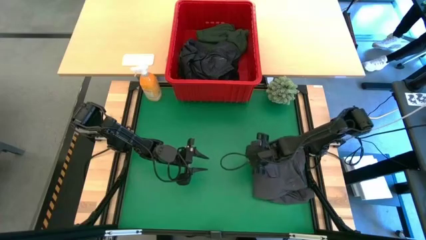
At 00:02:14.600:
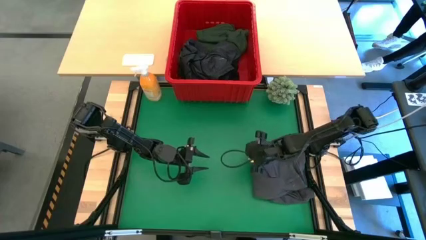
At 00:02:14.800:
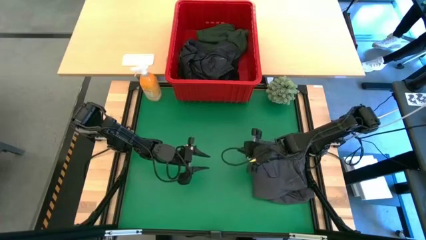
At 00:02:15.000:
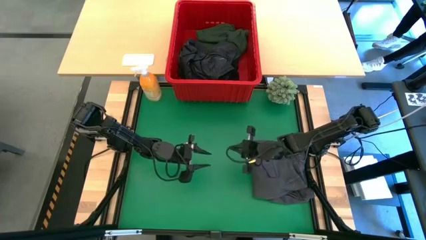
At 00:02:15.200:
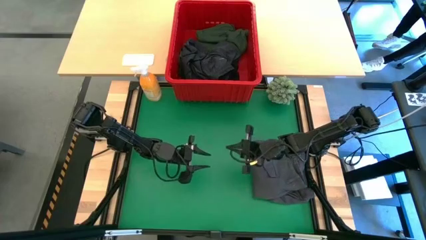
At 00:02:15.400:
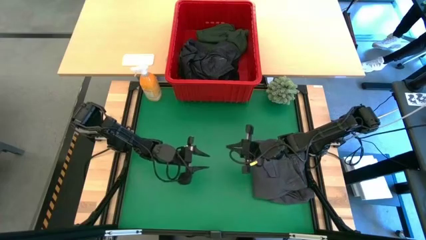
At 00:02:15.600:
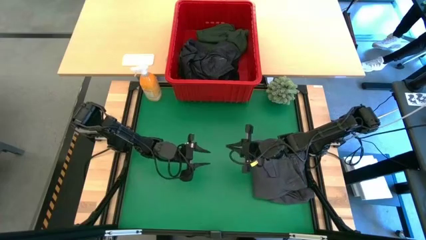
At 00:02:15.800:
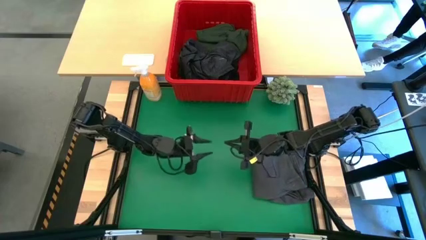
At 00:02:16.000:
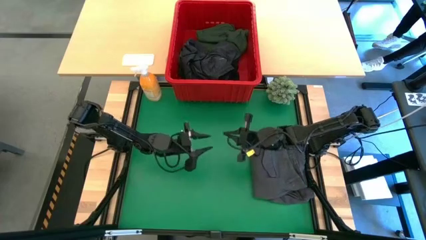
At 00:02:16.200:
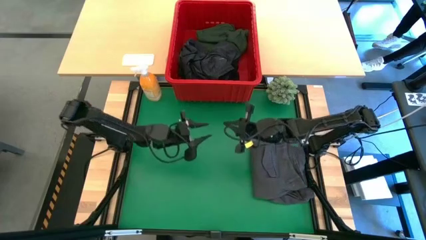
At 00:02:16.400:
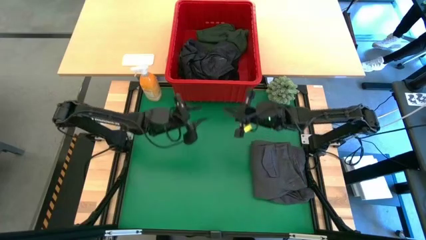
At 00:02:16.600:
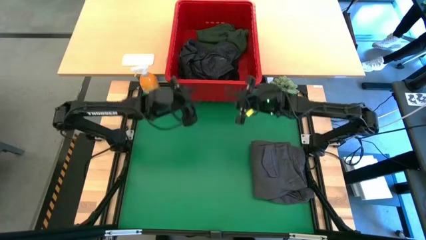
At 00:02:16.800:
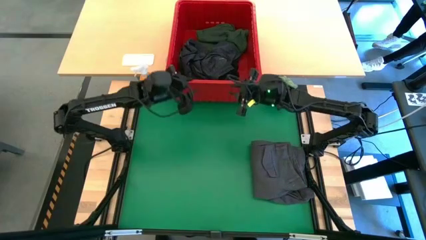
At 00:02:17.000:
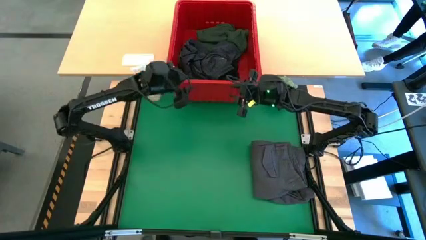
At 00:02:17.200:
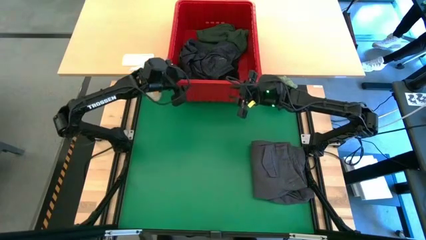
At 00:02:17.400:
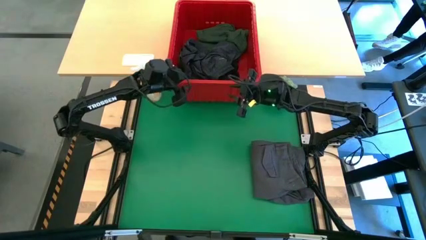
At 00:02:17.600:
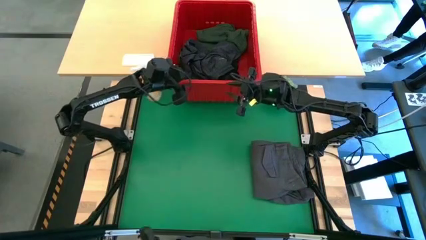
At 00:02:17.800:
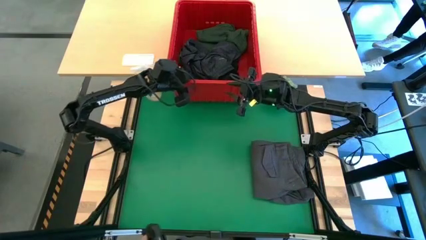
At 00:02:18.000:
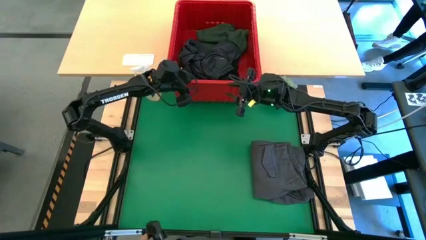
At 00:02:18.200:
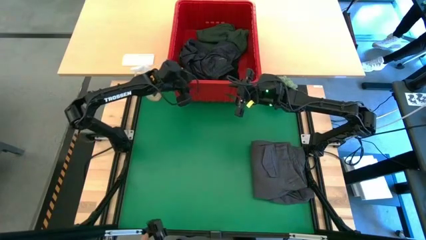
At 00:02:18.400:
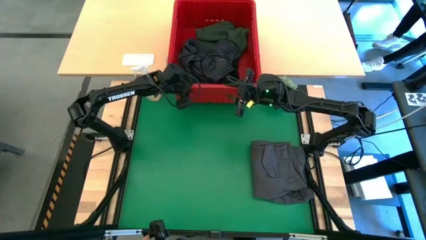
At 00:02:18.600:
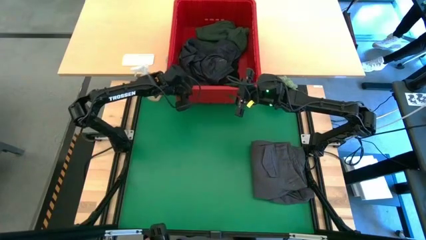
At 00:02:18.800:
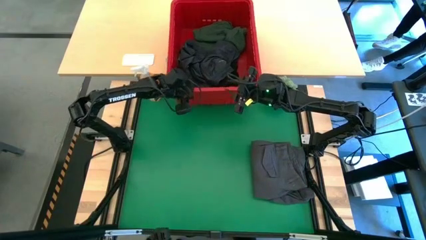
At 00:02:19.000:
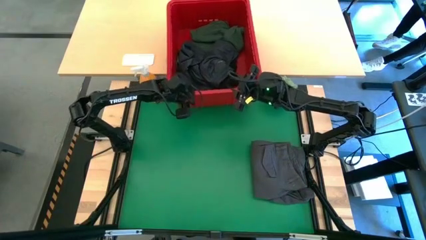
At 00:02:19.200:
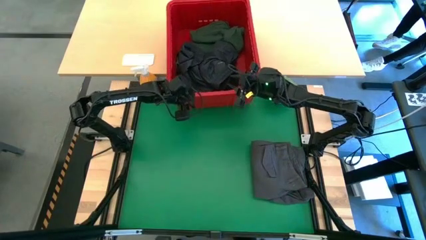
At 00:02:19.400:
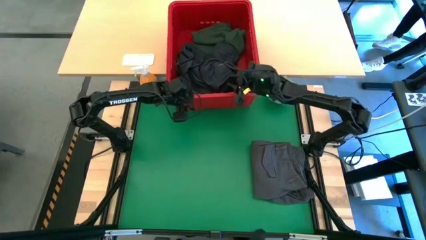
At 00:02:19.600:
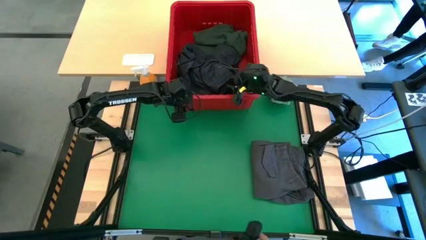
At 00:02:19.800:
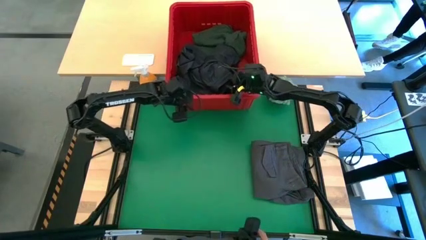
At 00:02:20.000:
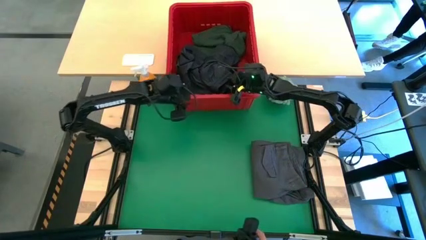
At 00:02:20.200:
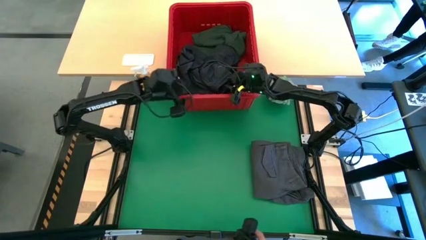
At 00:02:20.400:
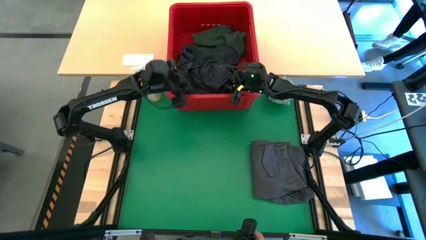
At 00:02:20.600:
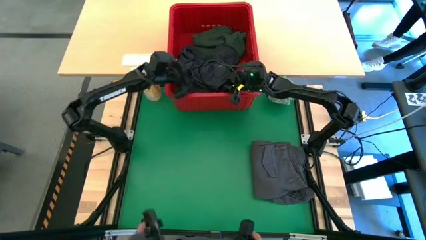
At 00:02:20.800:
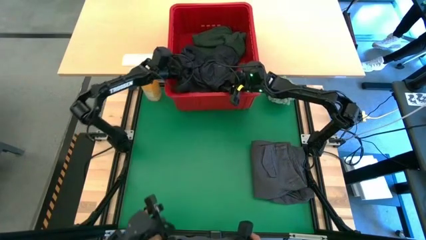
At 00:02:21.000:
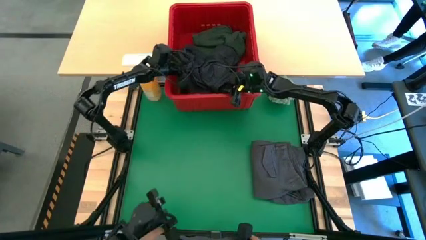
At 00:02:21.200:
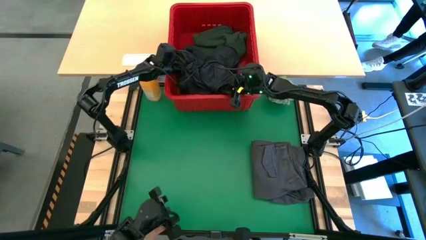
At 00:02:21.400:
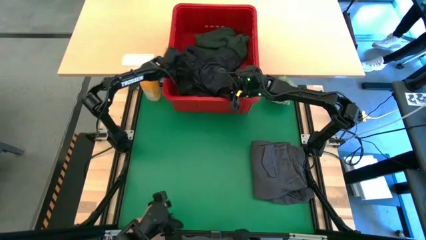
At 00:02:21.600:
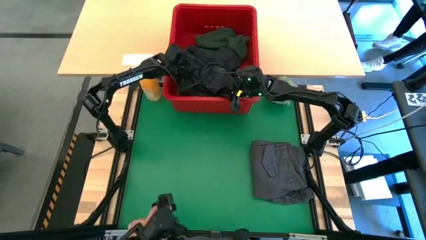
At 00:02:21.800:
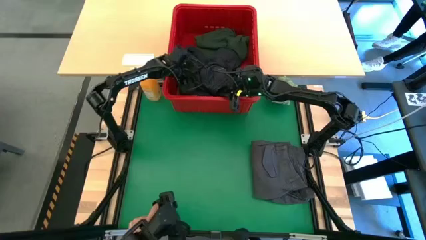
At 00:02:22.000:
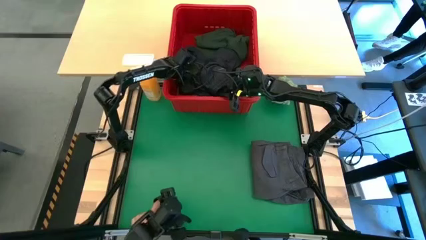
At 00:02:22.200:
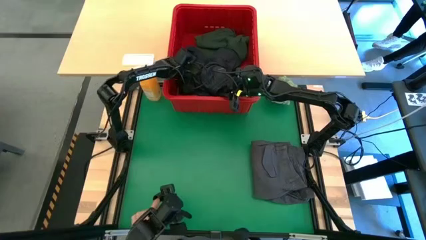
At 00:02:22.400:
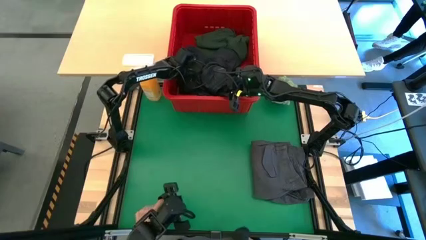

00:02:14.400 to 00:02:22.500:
Task: Fold Laundry from Bin
Remove the dark gray short from the red bin

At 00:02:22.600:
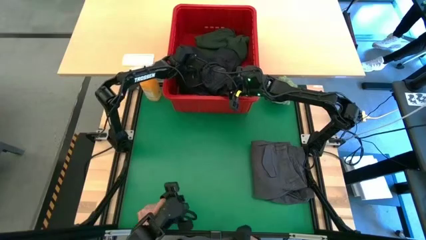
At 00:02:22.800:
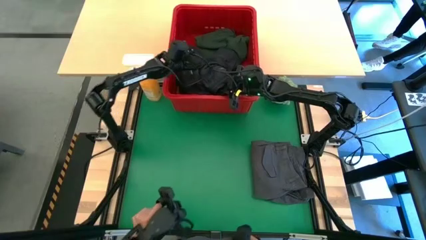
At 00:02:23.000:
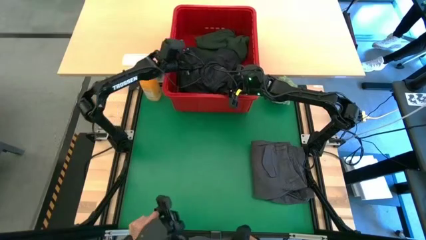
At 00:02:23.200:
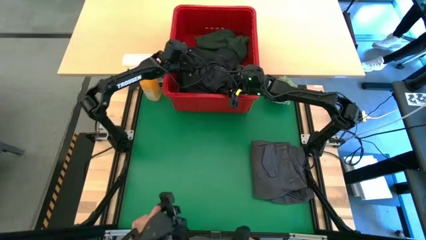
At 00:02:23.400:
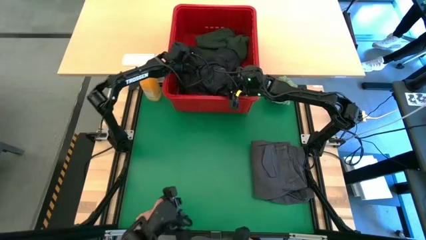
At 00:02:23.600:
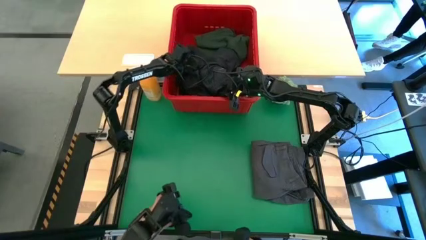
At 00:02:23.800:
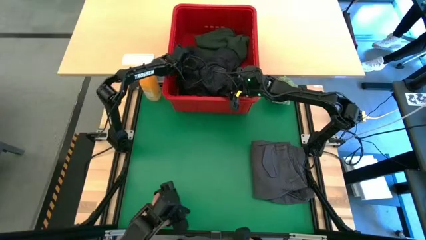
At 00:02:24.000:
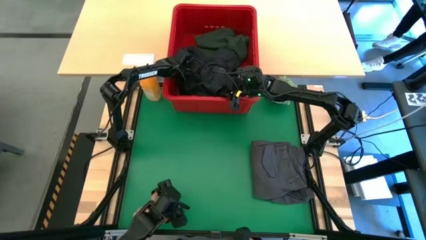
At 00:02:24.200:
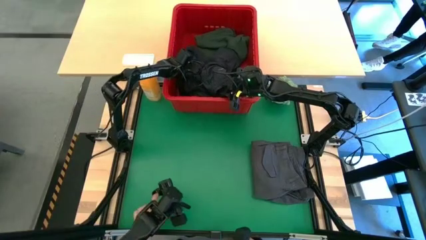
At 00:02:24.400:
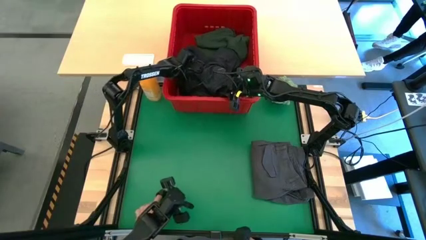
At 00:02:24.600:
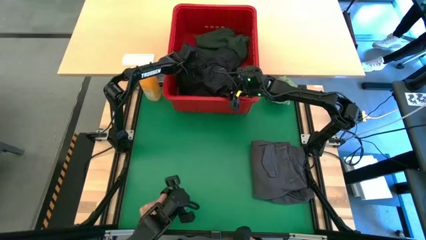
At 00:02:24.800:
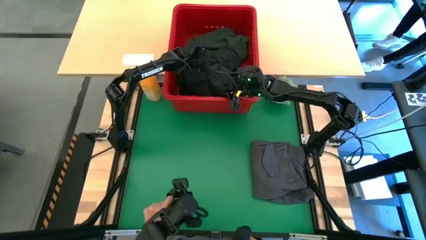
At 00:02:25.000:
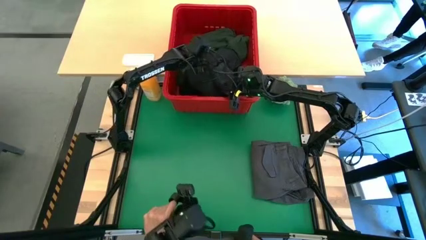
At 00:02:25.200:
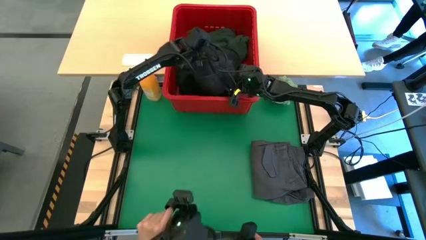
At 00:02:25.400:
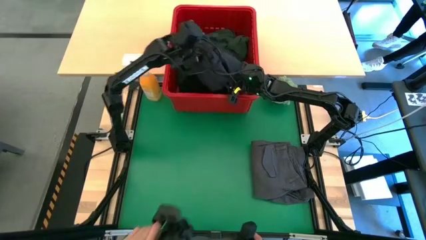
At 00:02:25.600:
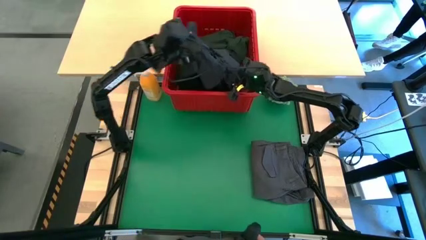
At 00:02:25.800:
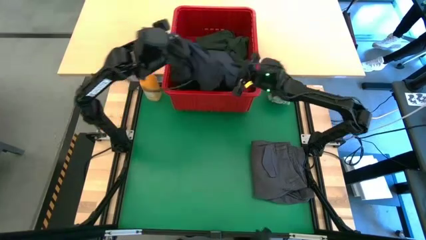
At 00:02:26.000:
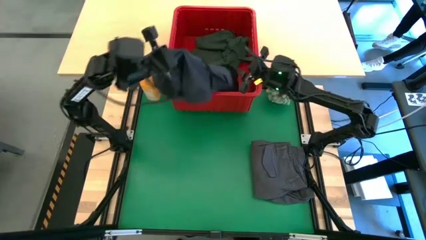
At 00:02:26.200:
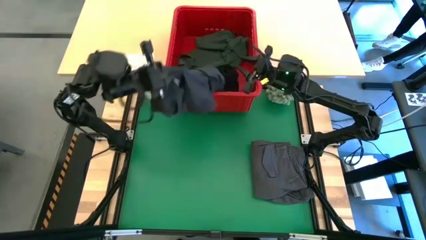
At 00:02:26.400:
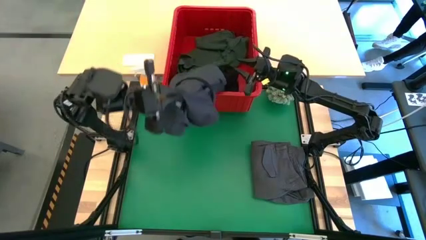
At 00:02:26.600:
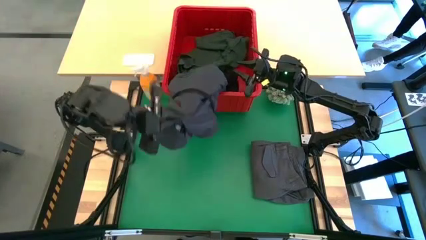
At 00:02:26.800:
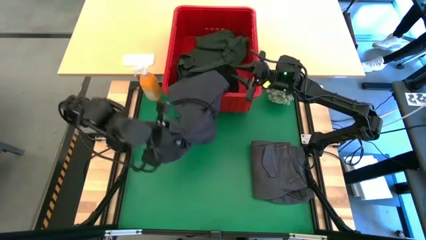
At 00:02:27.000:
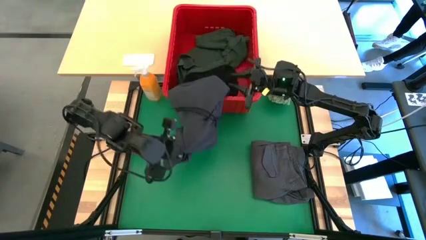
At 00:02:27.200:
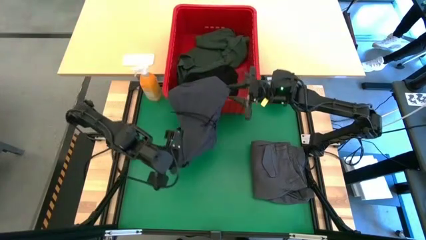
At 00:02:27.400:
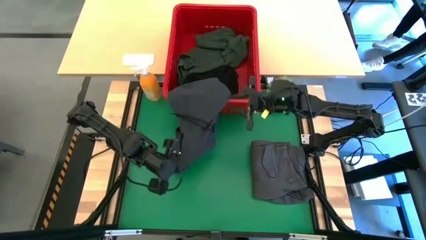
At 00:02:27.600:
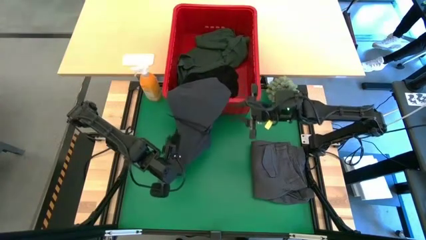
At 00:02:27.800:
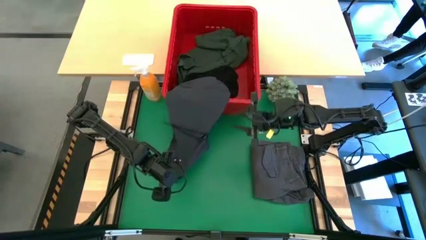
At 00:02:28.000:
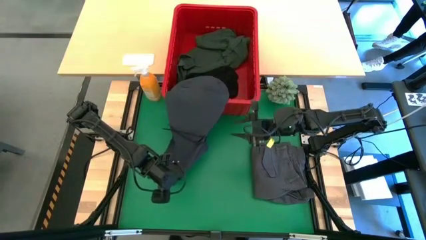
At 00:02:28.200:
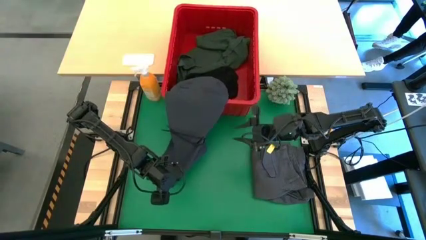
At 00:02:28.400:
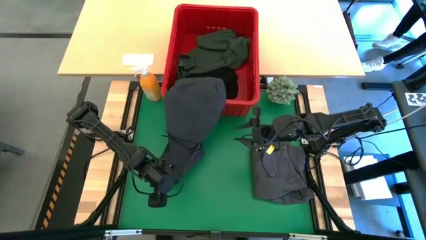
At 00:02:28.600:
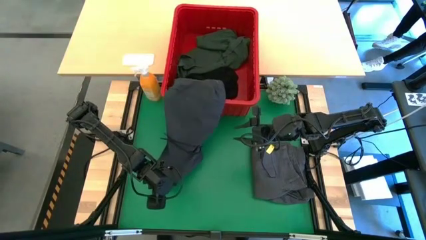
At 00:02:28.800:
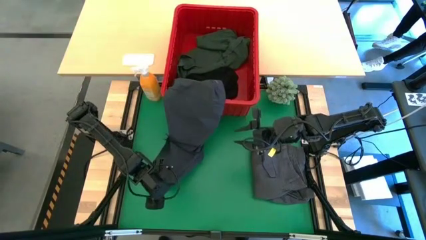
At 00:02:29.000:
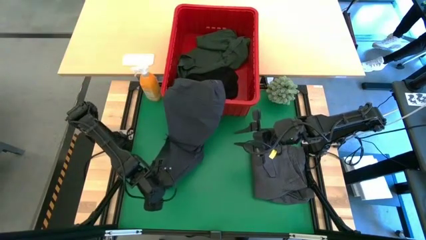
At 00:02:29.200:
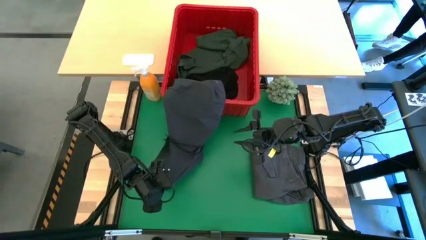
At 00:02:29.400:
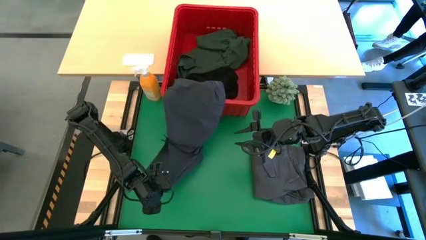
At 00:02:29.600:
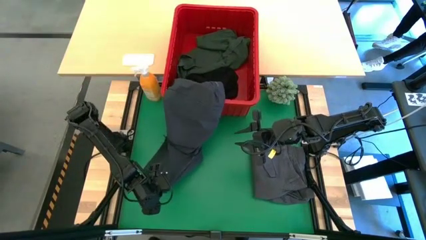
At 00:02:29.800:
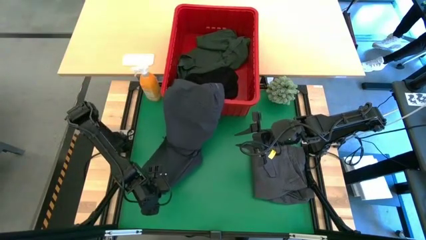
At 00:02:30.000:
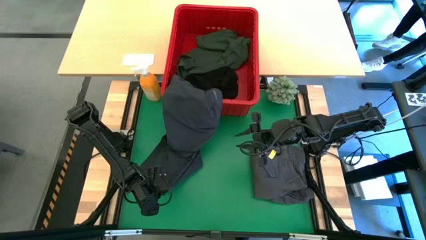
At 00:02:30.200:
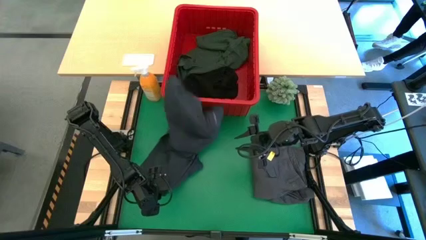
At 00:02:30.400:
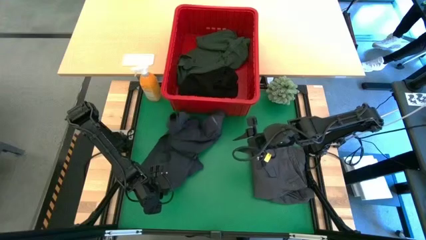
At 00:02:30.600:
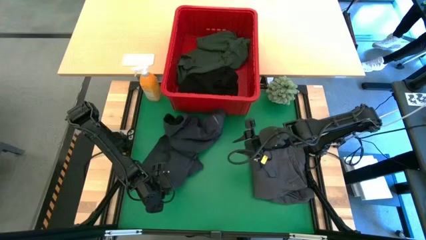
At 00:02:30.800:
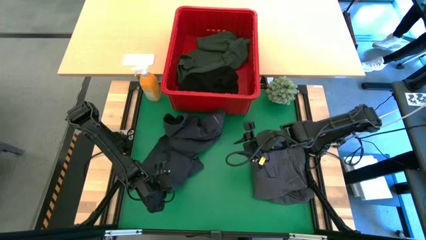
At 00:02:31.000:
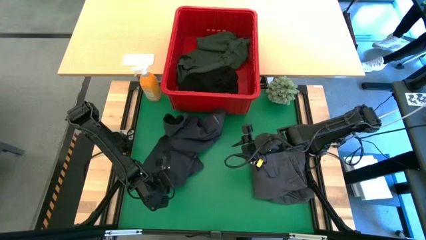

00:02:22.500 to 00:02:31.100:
Remove the dark gray short from the red bin
